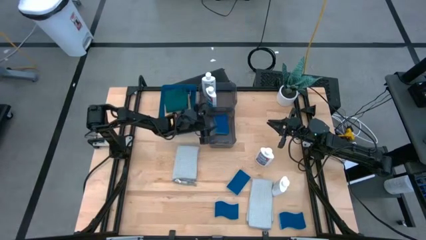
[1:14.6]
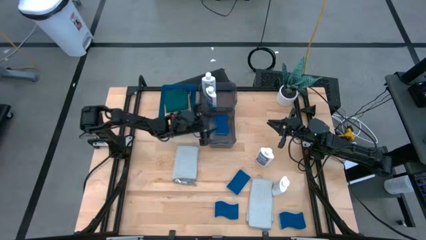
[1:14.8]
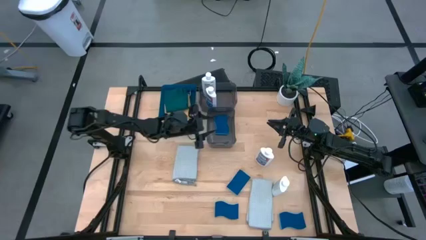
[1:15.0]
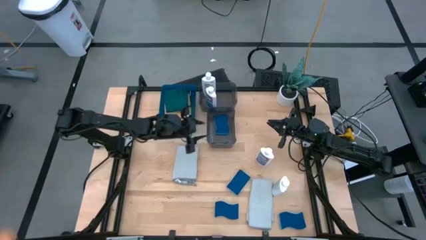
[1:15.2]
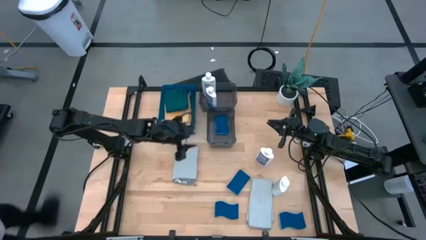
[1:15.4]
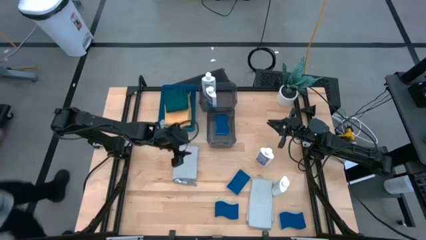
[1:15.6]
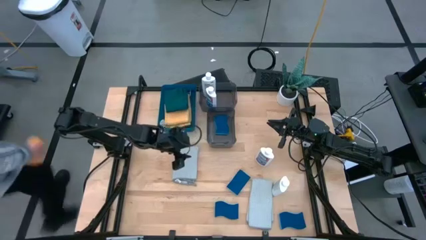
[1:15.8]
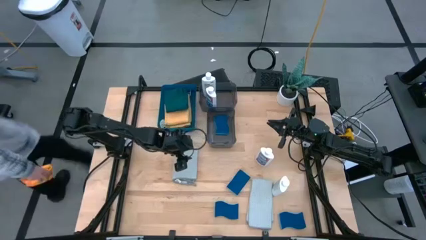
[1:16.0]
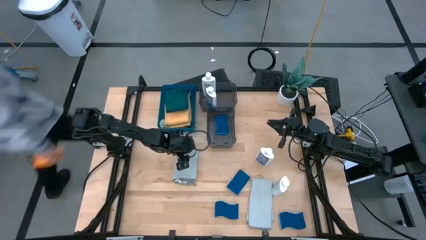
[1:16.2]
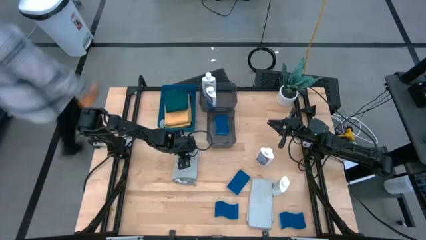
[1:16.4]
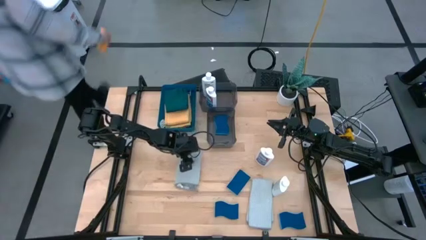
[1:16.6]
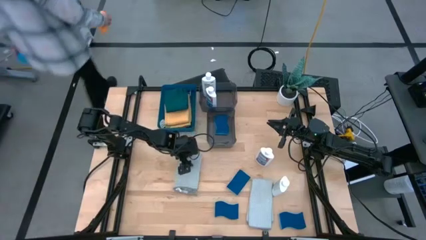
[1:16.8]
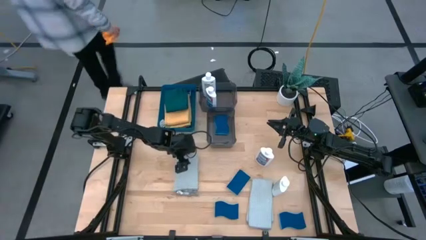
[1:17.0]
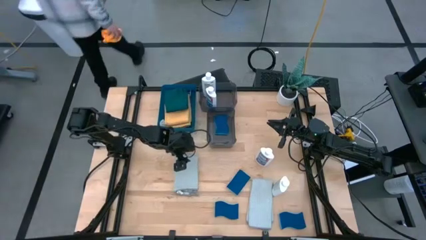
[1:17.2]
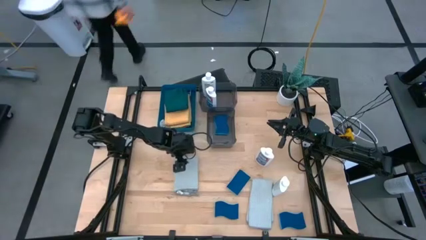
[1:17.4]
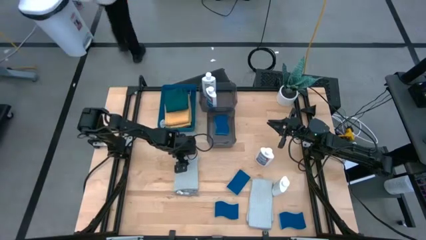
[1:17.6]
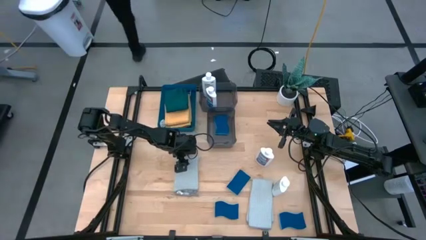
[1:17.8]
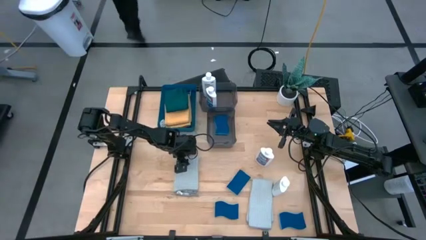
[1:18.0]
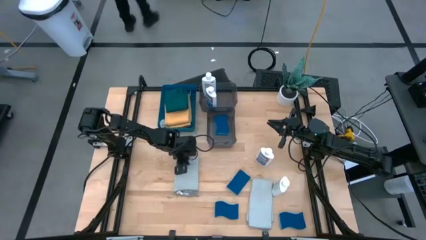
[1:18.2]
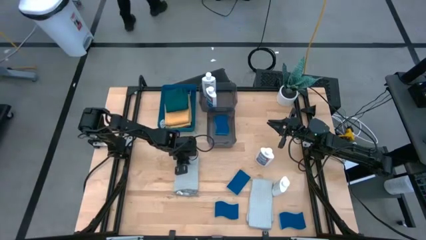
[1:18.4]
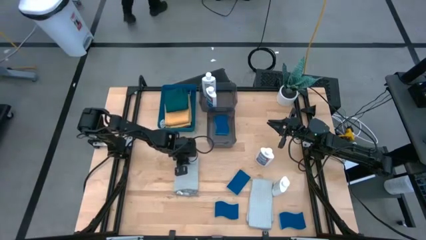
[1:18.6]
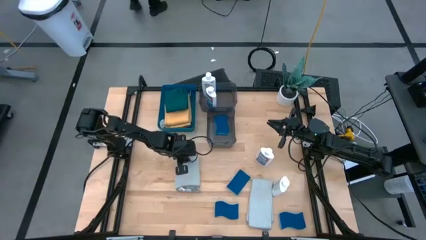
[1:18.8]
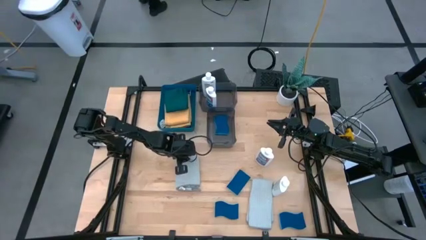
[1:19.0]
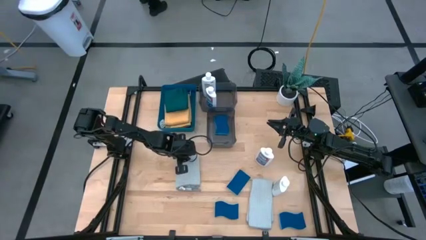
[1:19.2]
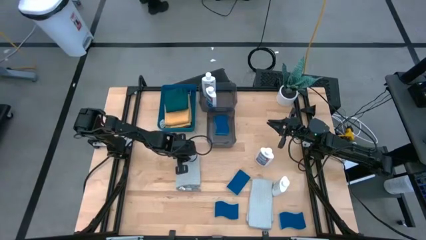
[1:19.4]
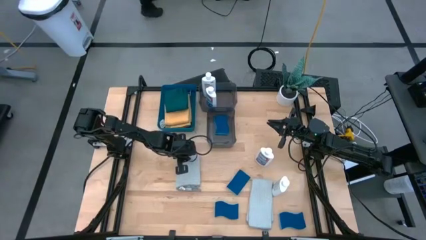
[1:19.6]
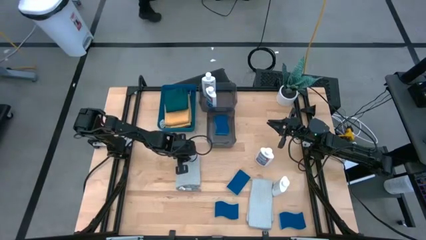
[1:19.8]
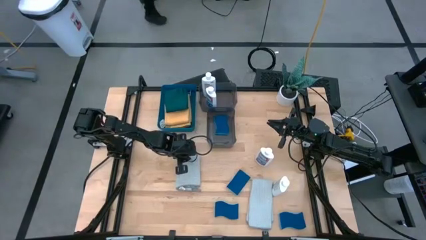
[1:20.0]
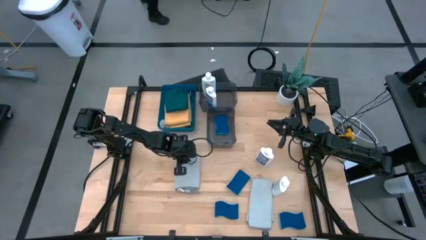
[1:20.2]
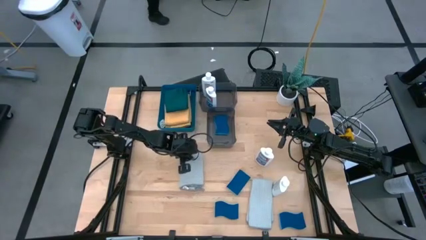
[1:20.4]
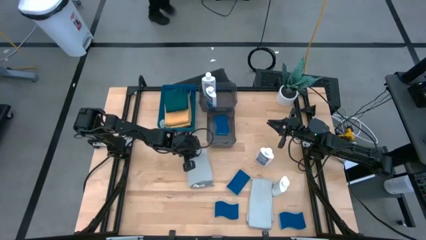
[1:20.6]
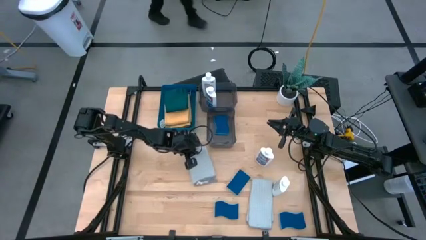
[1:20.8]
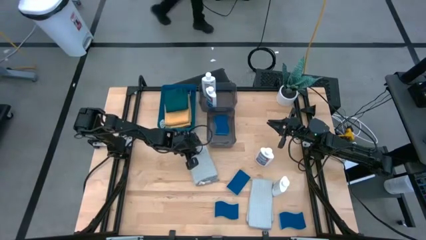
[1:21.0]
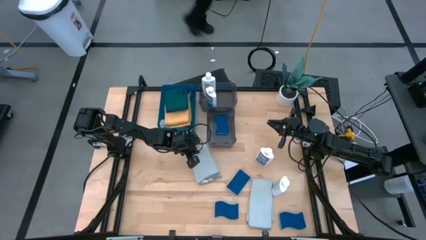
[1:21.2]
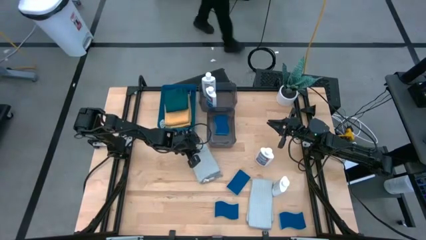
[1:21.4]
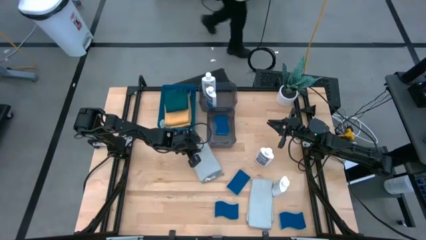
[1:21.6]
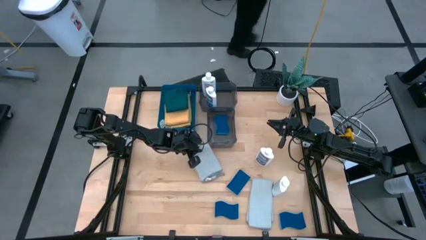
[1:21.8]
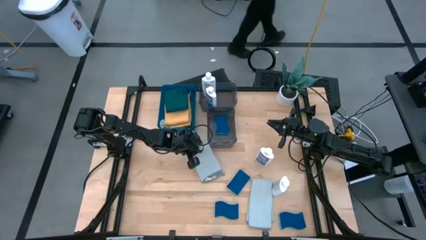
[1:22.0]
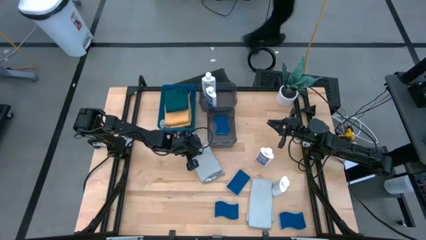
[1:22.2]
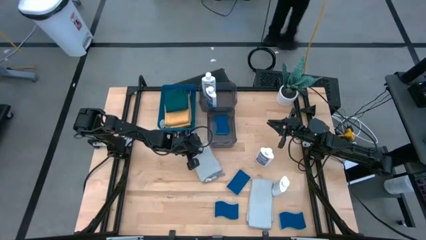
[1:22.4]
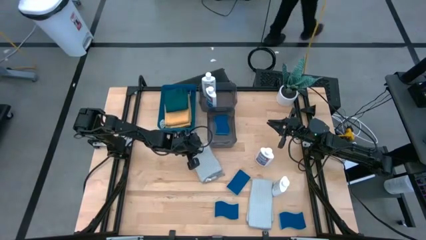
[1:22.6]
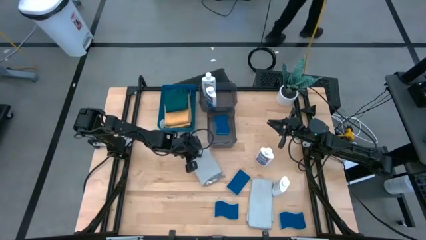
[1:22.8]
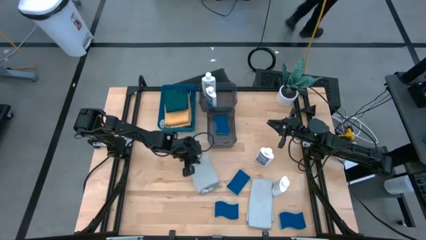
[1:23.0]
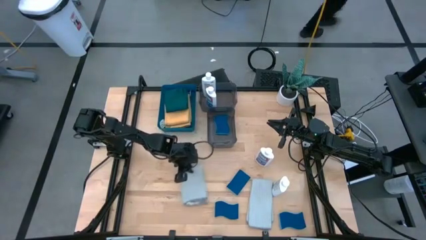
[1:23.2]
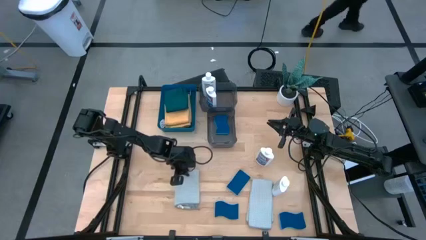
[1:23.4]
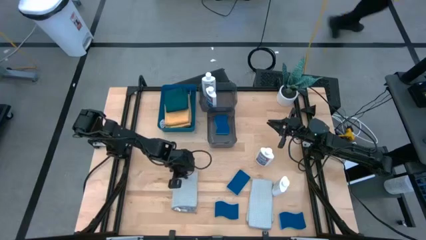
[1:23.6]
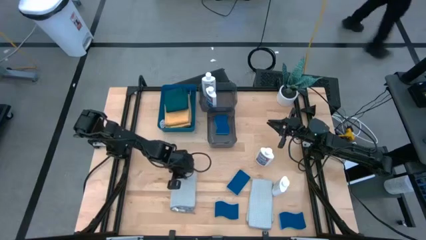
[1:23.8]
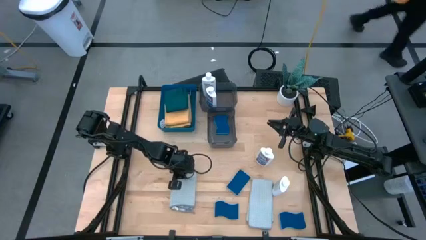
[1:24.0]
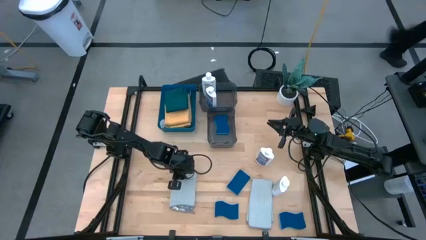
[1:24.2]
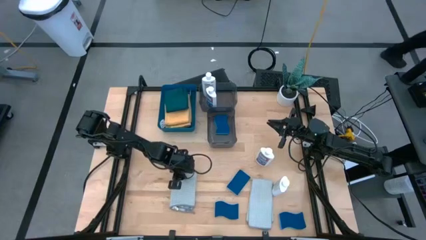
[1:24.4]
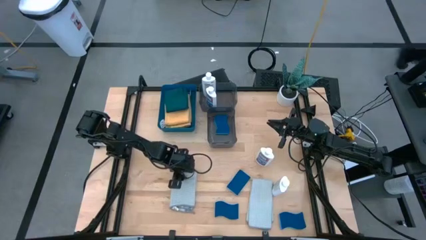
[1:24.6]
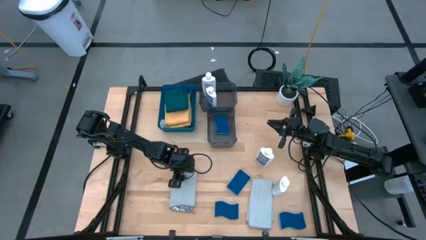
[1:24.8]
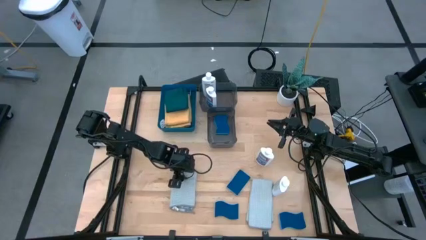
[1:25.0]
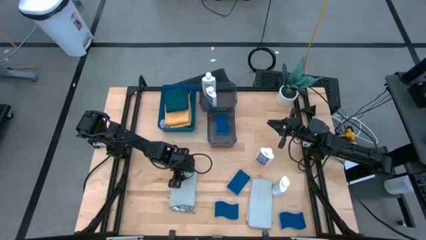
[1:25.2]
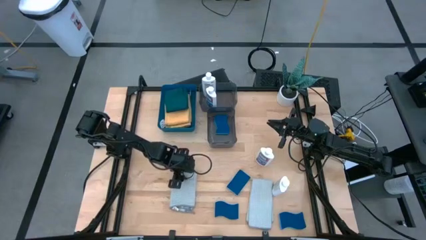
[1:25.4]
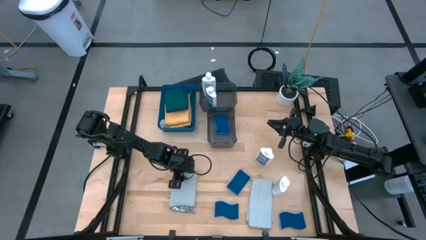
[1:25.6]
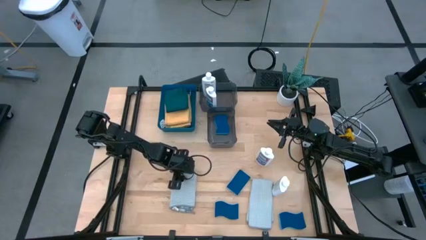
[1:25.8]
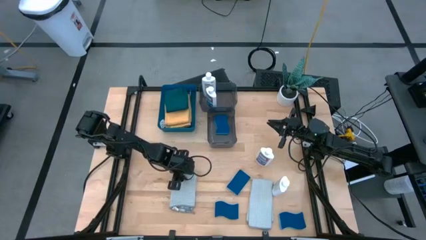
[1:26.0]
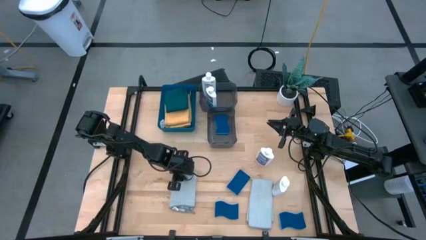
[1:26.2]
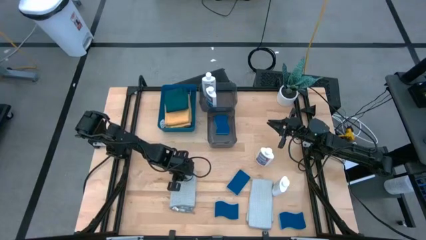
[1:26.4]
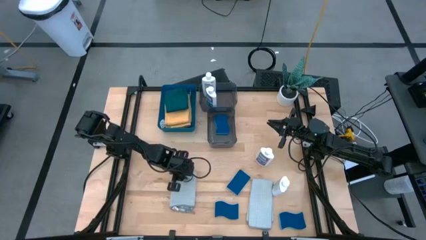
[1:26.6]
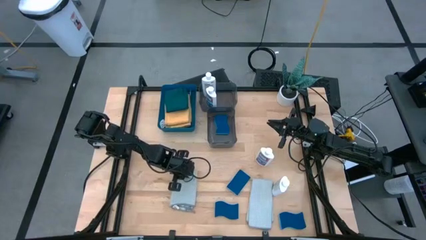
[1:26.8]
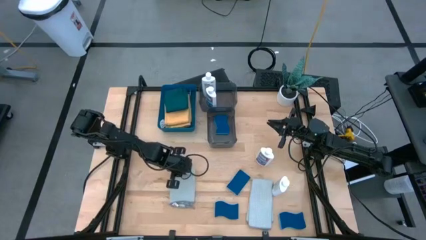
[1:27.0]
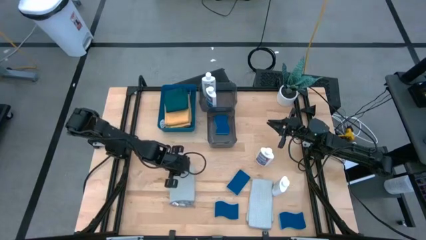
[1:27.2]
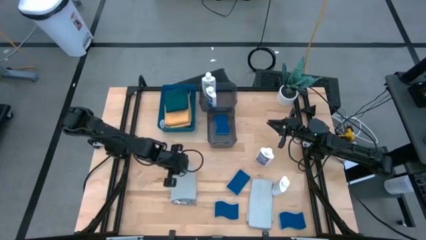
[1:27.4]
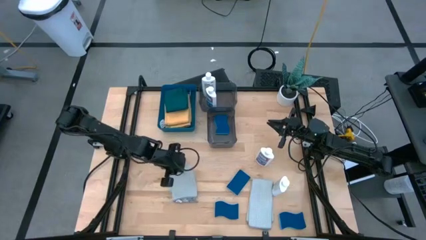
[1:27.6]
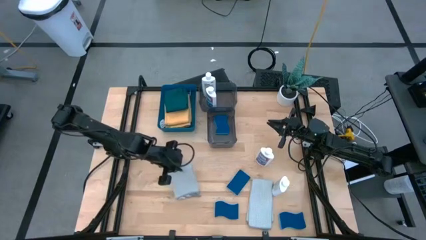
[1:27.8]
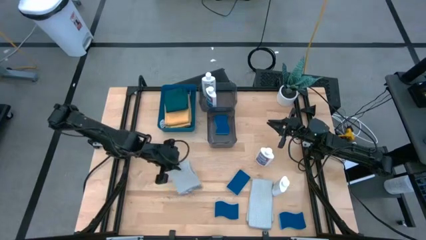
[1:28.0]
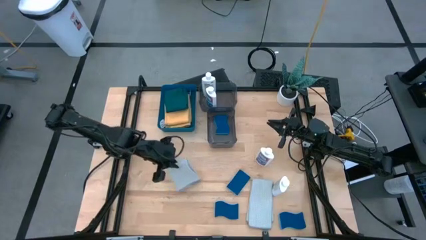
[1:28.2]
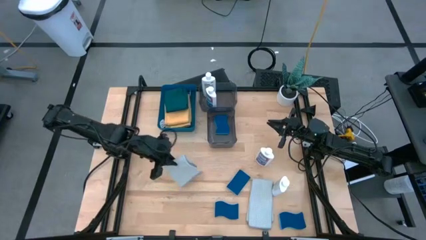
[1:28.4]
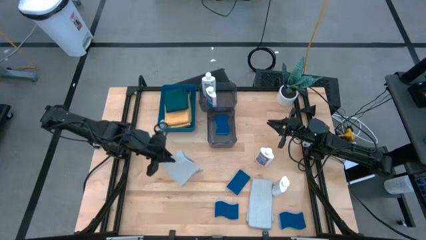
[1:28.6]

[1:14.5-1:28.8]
Task: Pick & Place Kitchen Items
Put the left gray microfiber towel into the blue bin

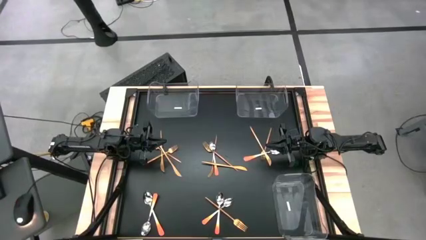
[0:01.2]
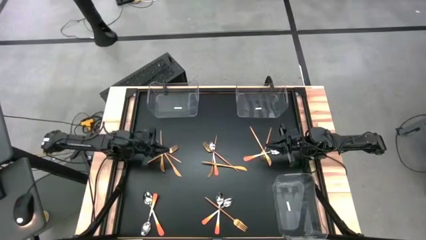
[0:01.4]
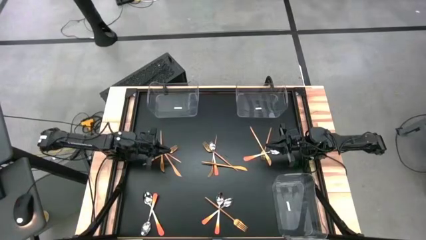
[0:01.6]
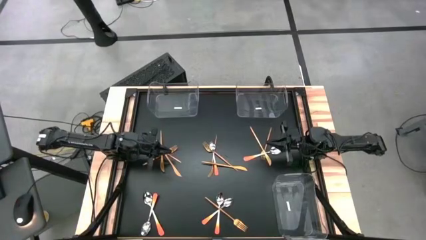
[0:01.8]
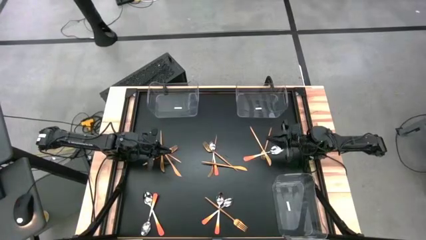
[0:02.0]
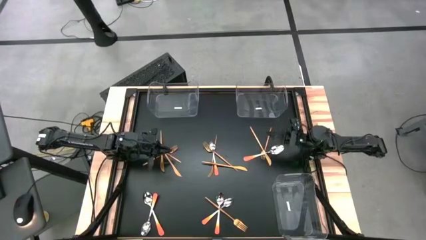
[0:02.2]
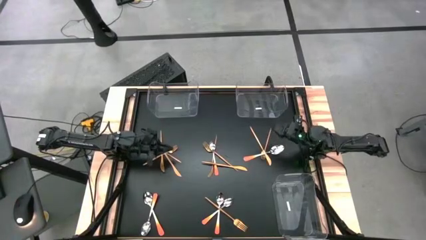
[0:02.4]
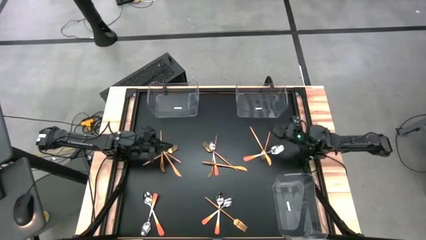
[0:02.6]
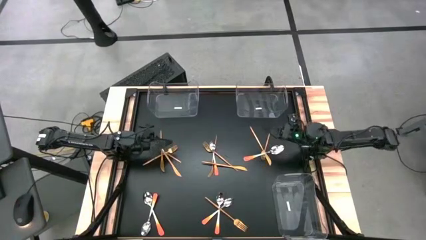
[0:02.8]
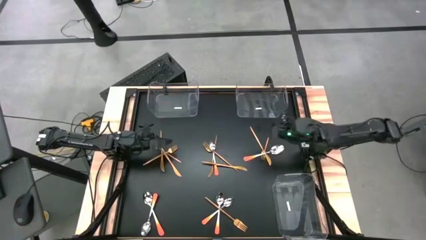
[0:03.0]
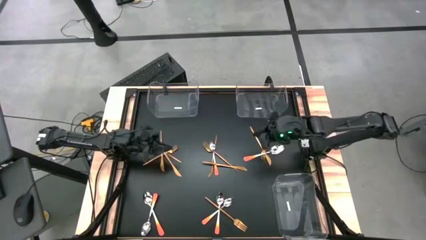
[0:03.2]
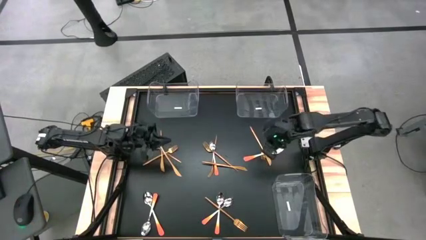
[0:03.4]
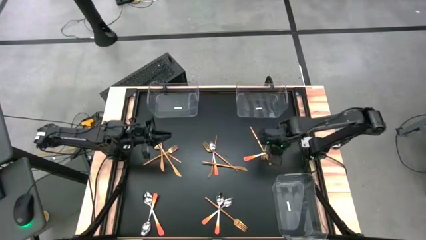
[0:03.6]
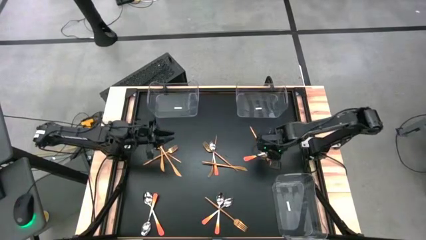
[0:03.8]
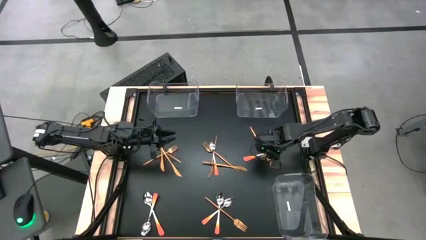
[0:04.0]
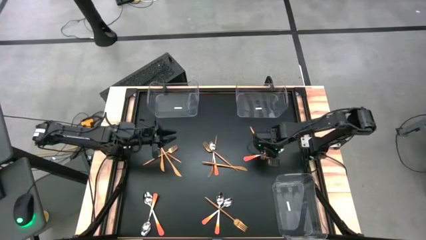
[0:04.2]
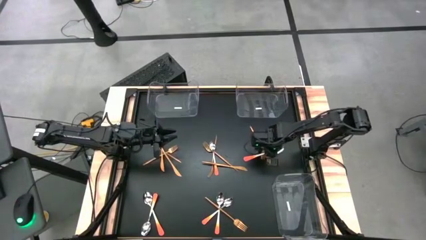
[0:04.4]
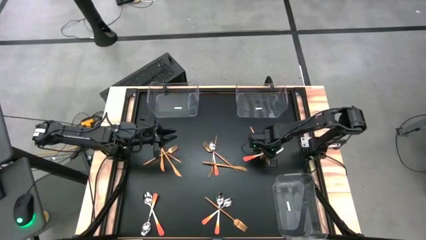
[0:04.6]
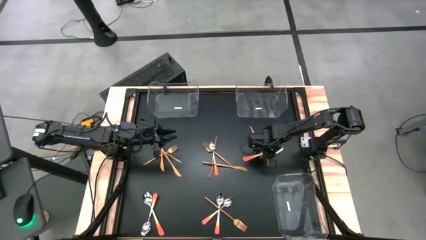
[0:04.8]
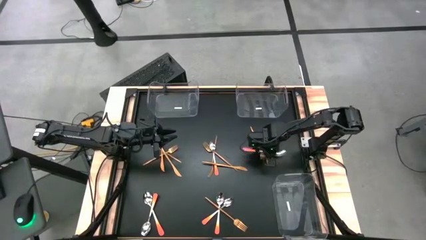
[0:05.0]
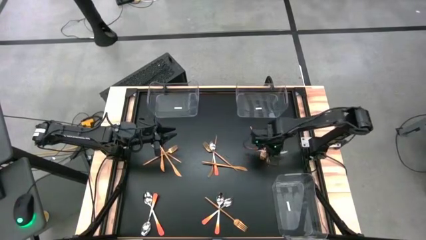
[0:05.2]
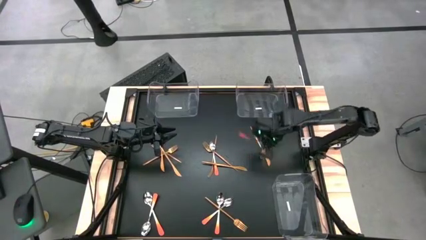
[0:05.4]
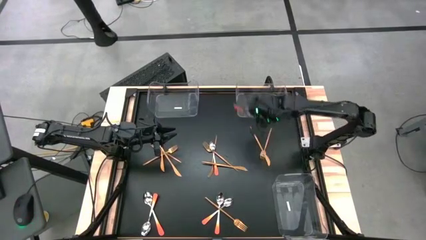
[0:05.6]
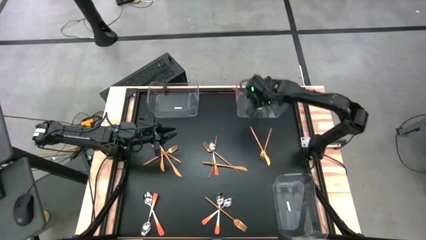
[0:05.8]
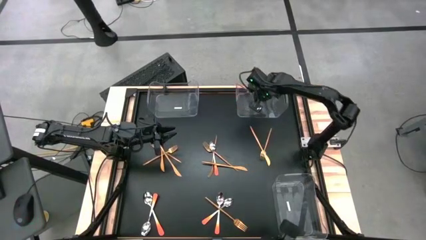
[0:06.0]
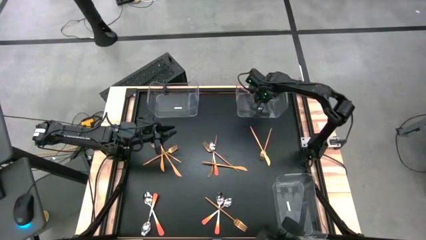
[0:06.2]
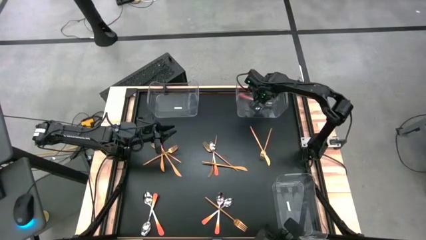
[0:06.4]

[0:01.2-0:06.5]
Task: Sort silverware by color (type)
Put the orange spoon into the top right transparent bin
